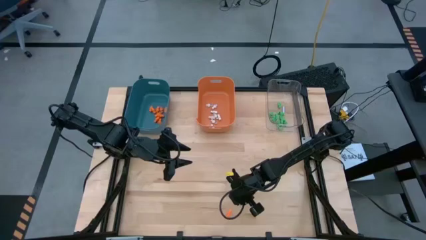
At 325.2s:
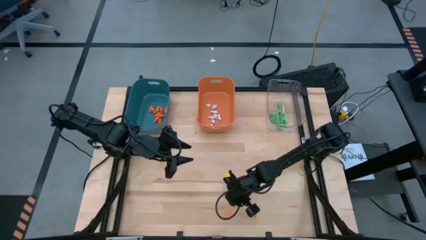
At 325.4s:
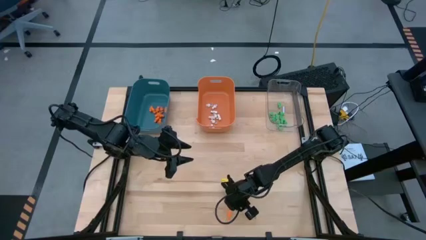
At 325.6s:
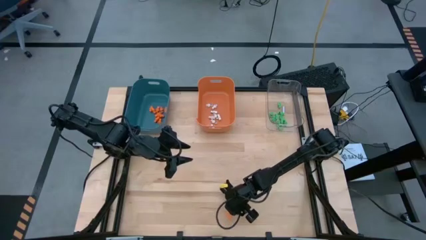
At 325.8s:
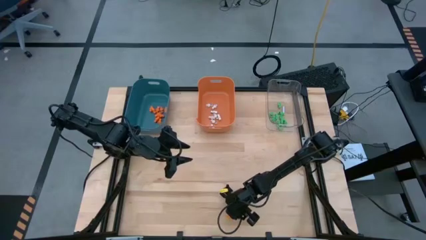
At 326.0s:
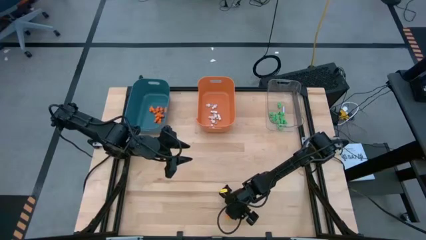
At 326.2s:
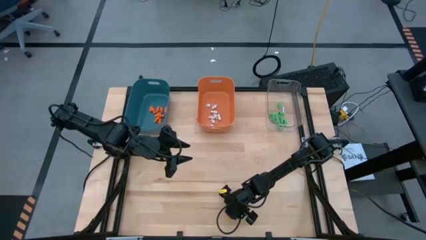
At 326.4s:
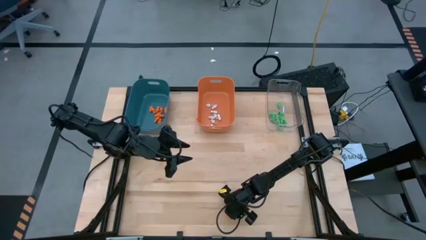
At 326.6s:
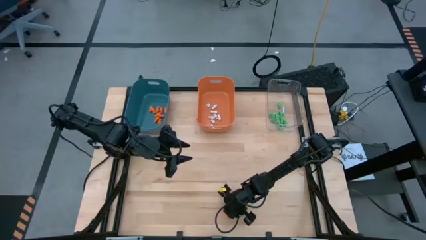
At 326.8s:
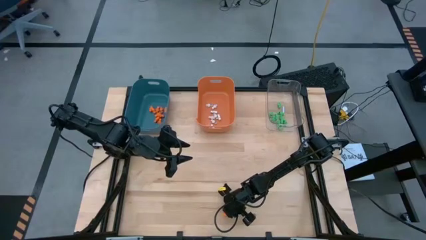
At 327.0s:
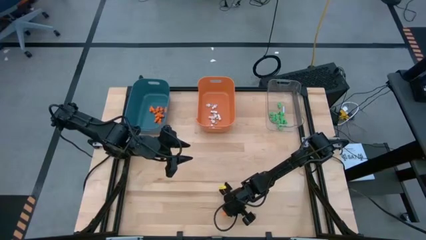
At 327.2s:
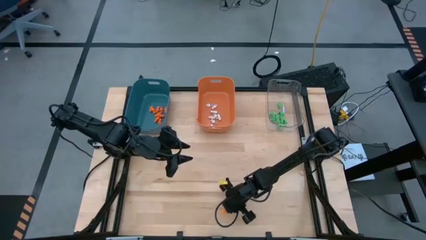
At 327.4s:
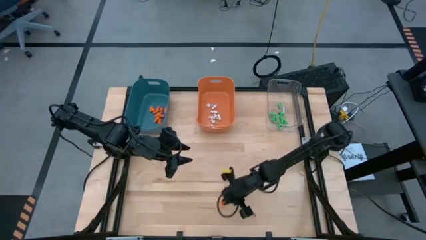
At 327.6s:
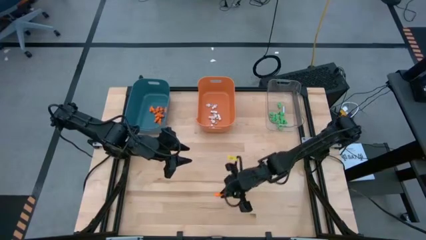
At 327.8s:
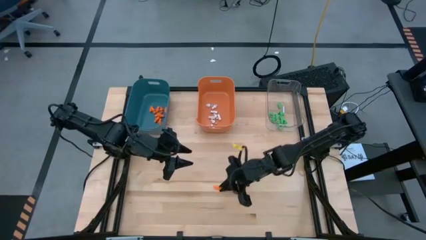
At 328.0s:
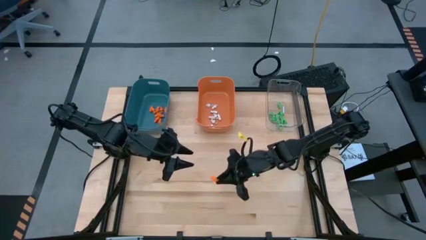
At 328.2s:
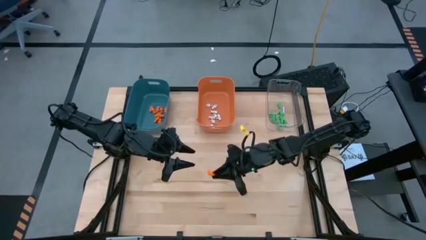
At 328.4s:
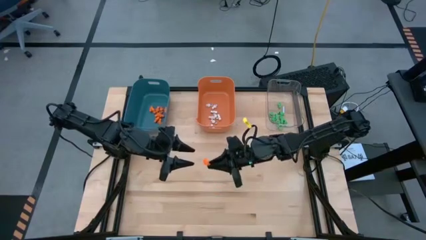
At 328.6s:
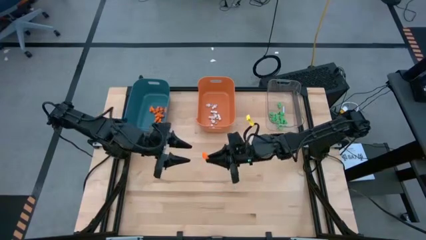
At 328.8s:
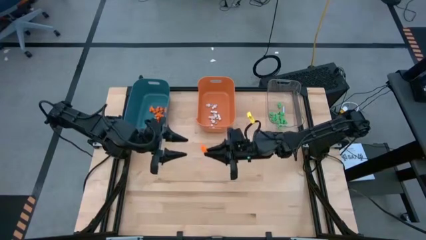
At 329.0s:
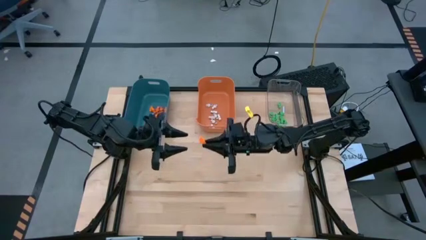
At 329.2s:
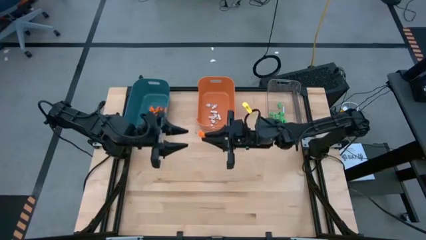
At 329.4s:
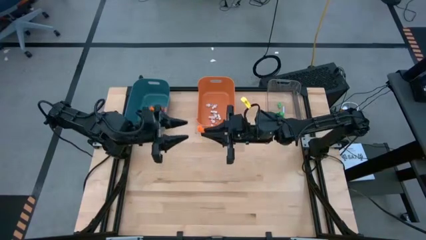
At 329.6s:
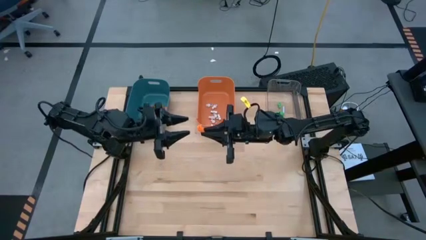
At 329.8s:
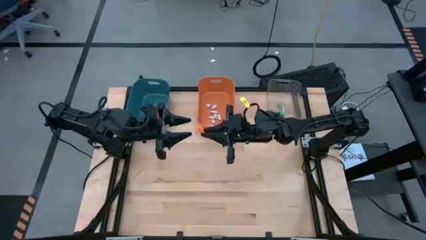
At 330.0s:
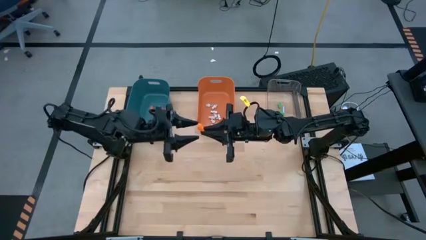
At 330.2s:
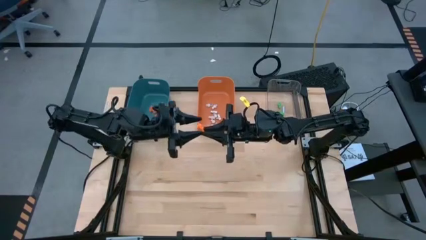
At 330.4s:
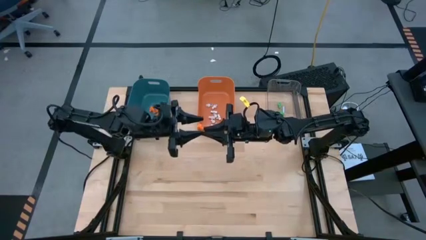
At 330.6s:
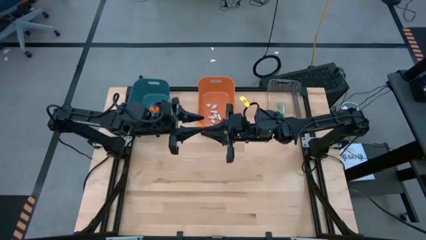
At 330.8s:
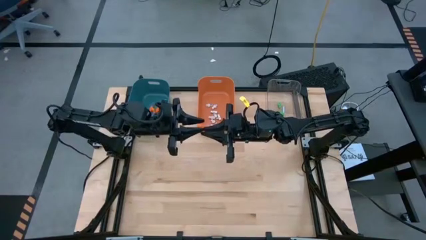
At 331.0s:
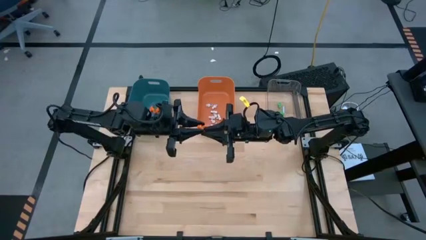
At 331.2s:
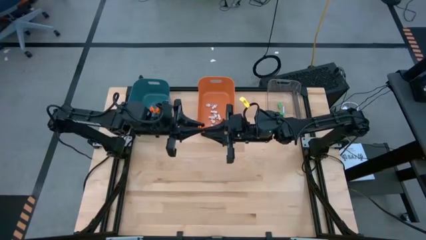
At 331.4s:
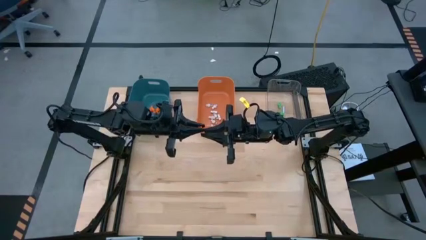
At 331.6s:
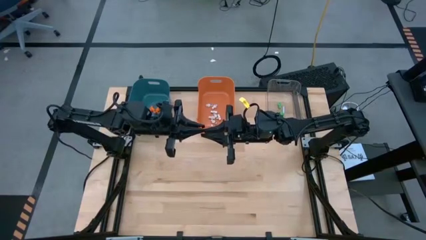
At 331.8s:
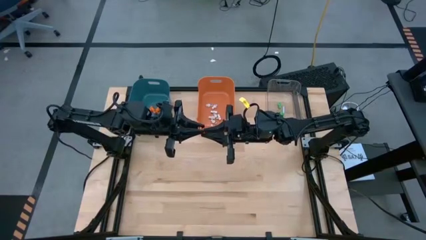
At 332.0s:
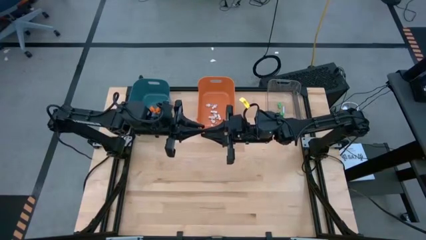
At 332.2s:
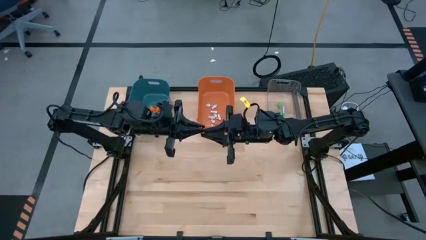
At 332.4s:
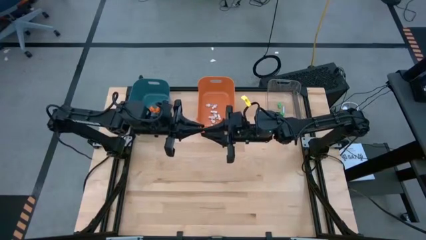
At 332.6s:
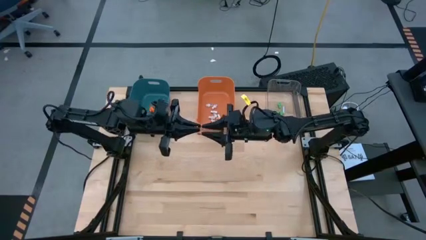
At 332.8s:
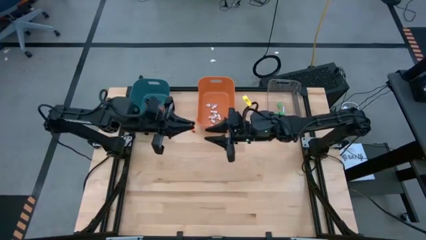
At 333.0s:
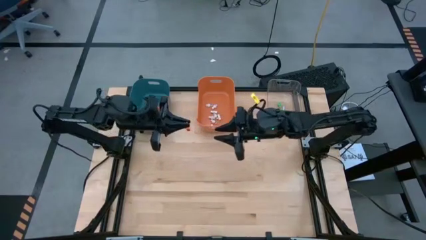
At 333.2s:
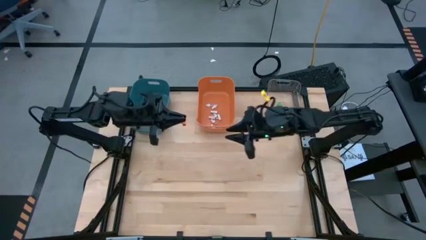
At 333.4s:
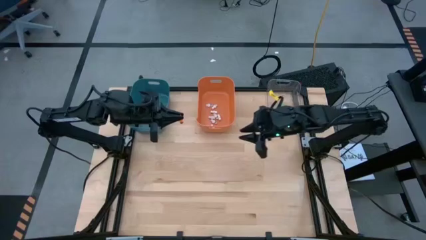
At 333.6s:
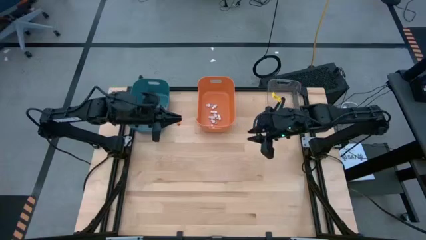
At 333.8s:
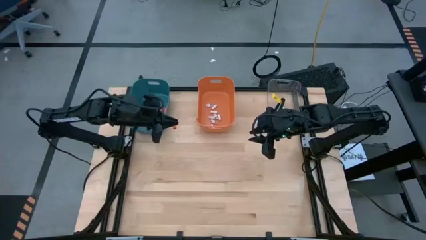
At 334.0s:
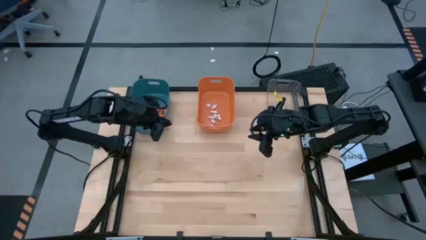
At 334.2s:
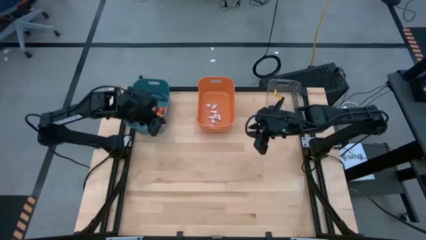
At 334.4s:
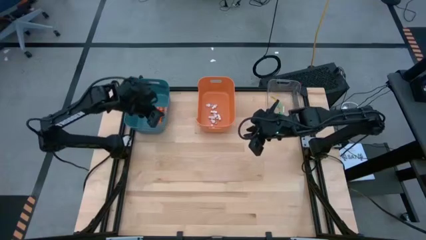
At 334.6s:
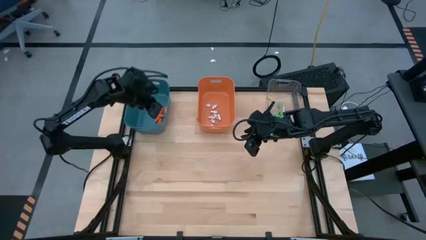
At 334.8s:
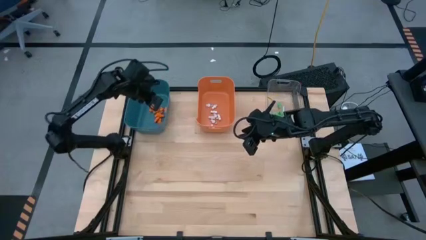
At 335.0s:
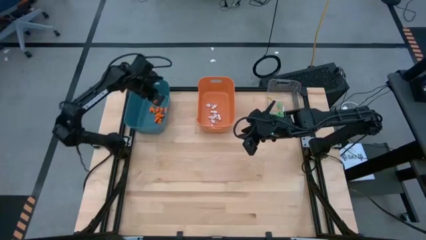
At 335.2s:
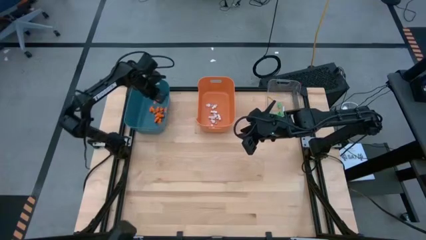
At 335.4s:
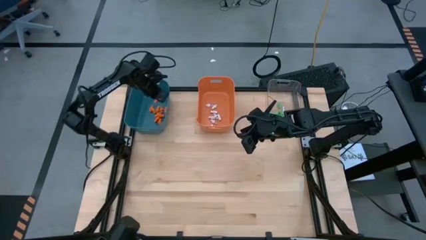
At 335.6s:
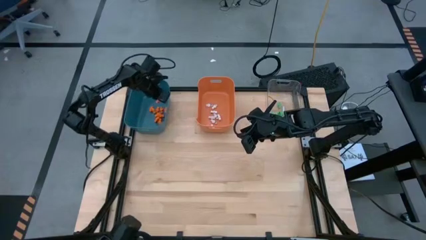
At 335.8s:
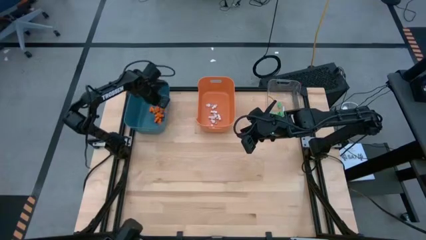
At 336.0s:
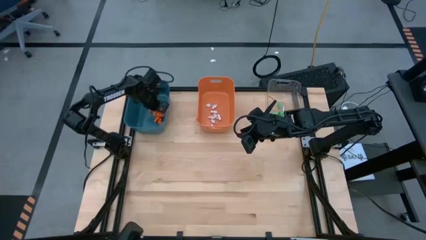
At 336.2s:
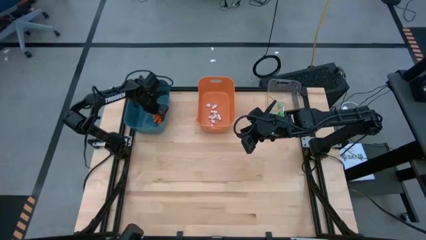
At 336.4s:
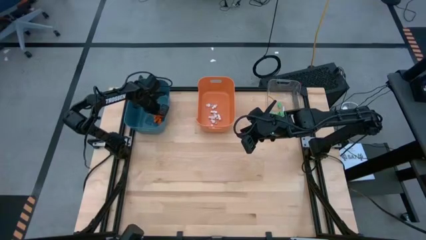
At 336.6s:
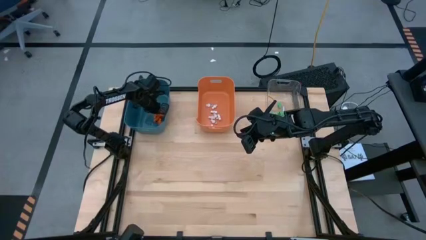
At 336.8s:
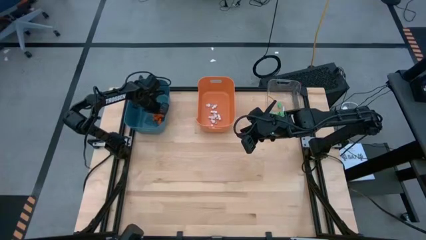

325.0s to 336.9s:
Task: Sort Halloween decoration
Put the orange skeleton toy into the blue bin
